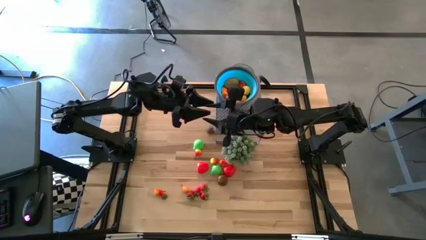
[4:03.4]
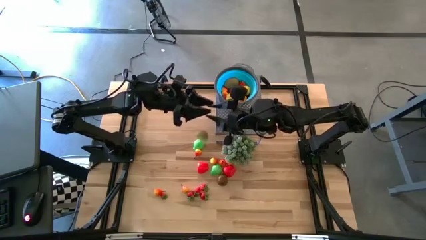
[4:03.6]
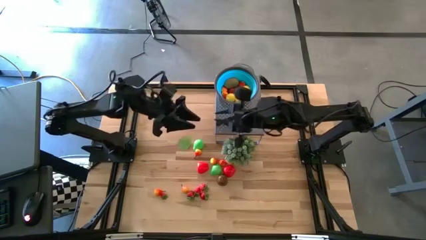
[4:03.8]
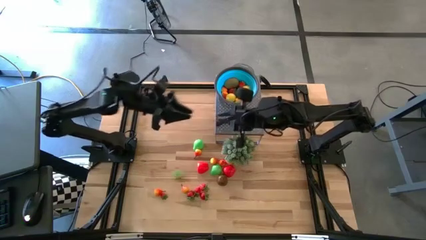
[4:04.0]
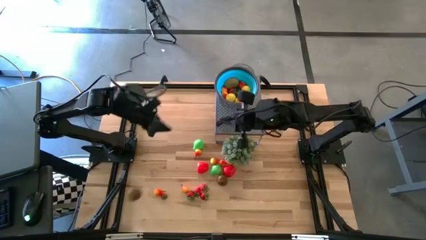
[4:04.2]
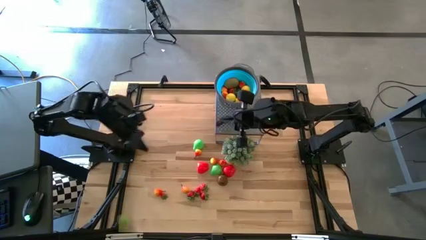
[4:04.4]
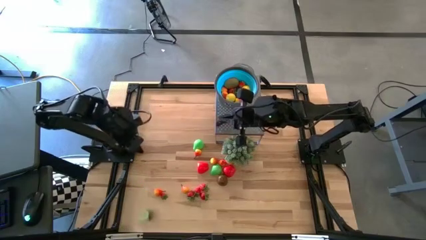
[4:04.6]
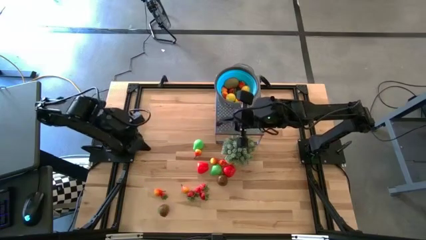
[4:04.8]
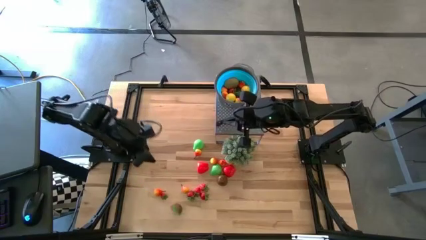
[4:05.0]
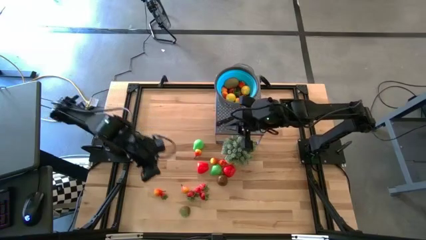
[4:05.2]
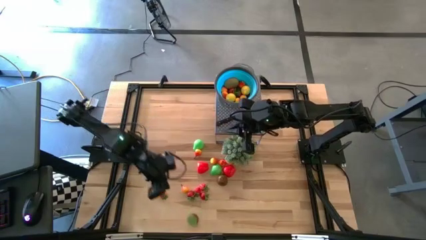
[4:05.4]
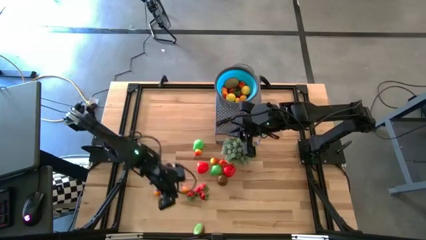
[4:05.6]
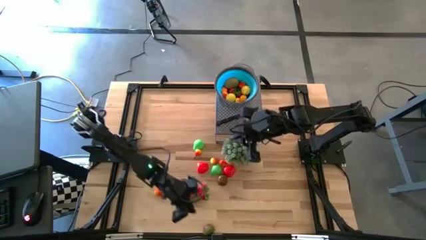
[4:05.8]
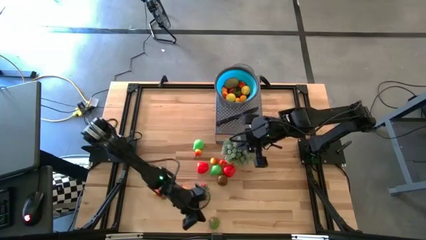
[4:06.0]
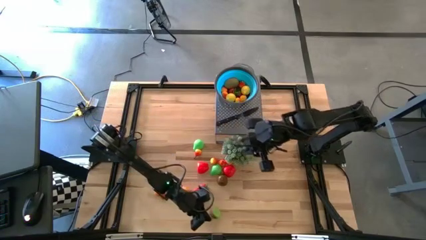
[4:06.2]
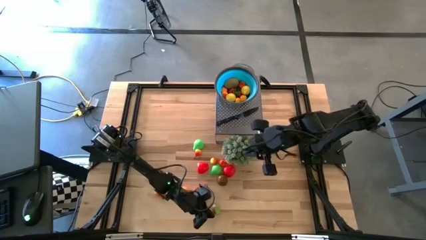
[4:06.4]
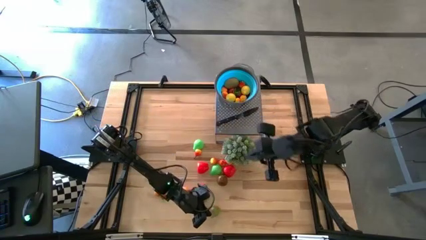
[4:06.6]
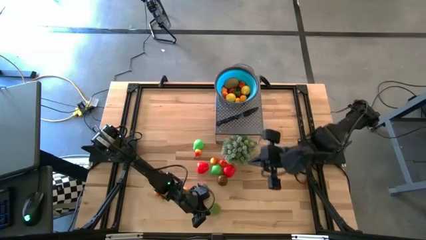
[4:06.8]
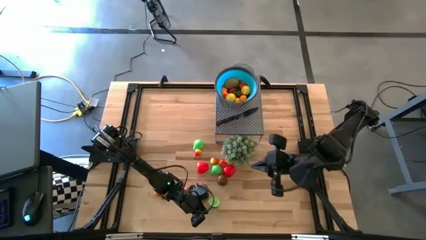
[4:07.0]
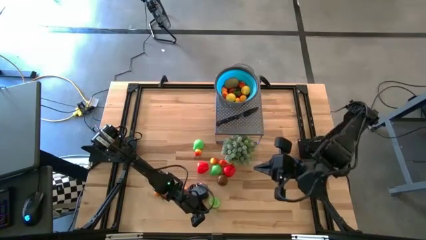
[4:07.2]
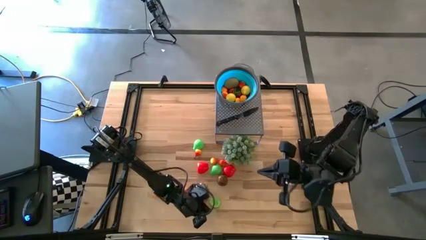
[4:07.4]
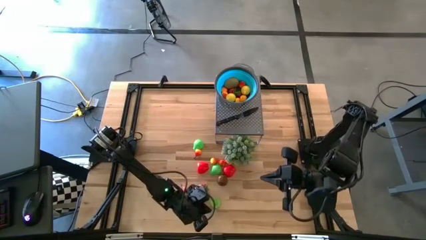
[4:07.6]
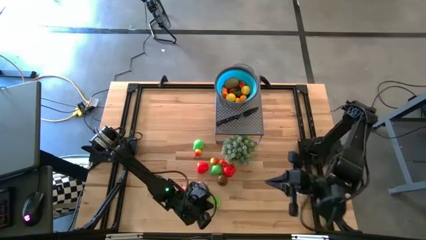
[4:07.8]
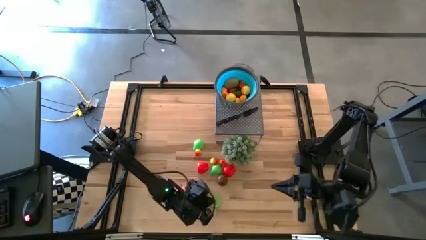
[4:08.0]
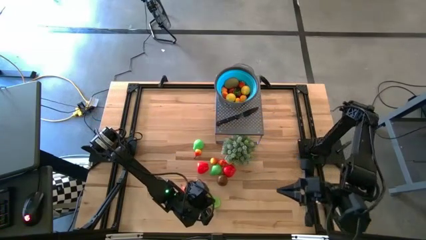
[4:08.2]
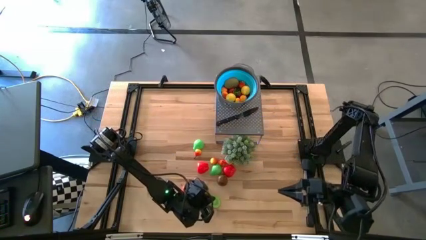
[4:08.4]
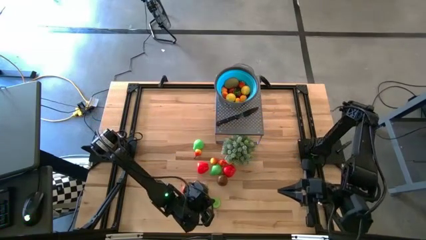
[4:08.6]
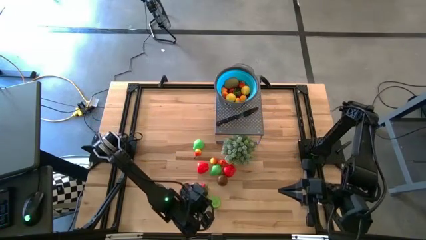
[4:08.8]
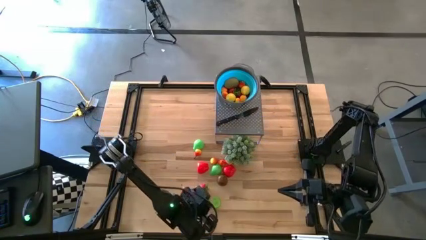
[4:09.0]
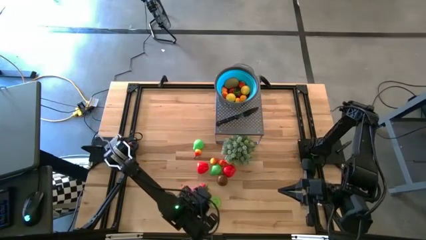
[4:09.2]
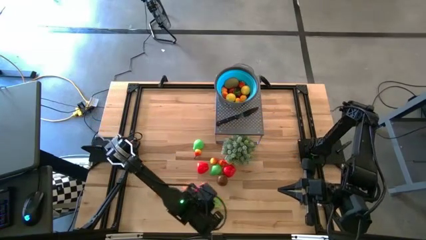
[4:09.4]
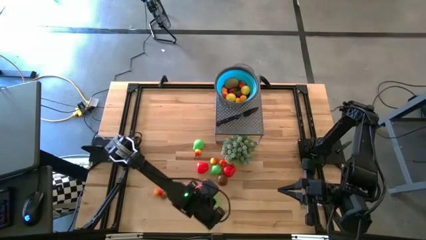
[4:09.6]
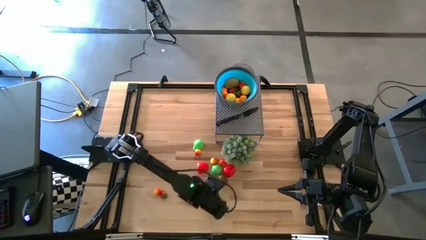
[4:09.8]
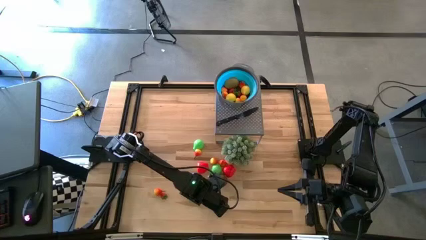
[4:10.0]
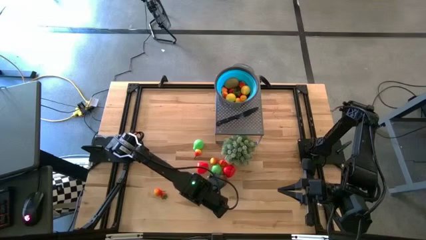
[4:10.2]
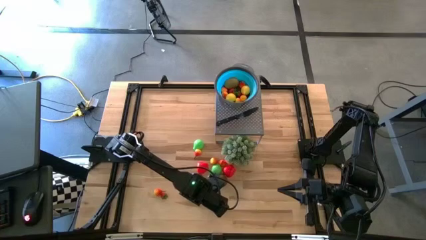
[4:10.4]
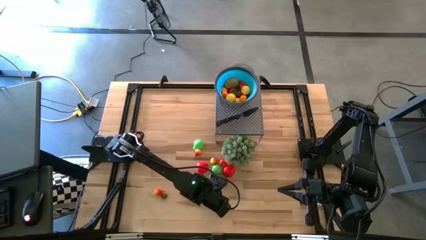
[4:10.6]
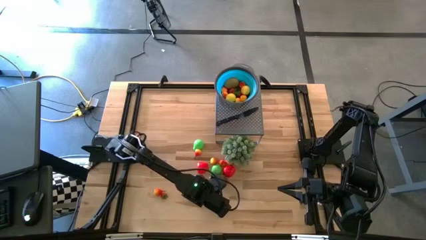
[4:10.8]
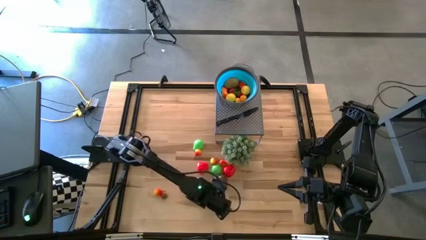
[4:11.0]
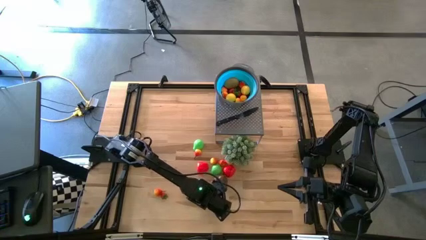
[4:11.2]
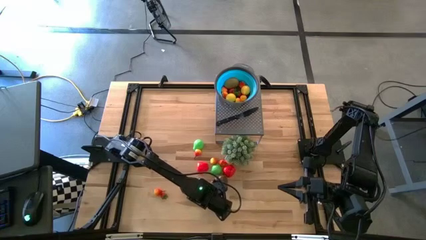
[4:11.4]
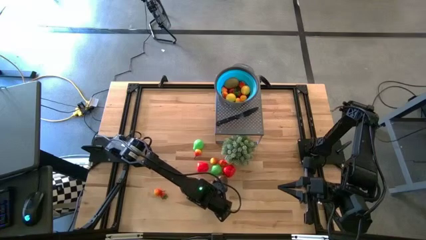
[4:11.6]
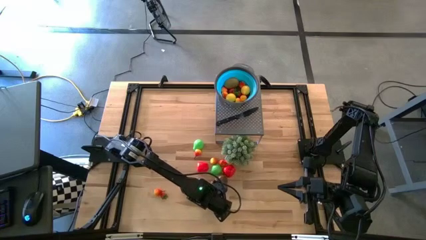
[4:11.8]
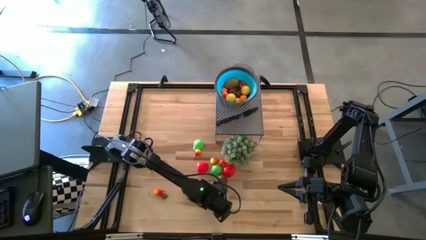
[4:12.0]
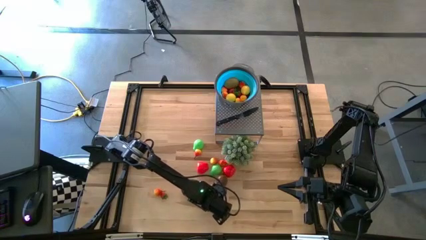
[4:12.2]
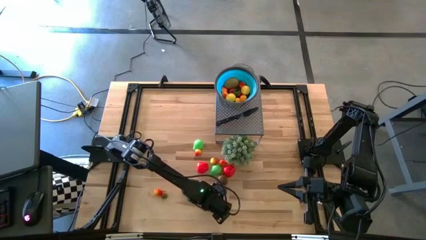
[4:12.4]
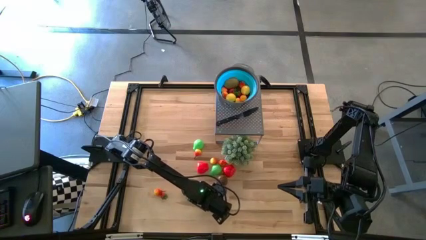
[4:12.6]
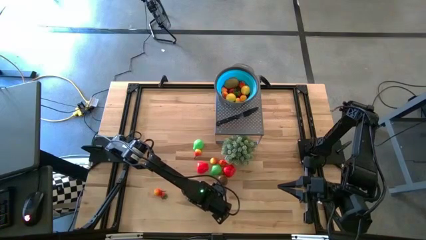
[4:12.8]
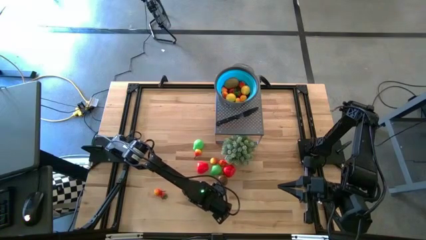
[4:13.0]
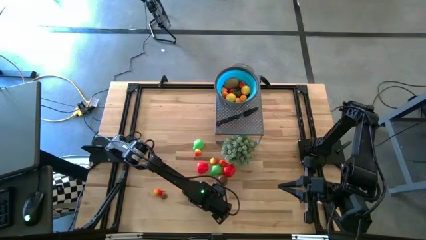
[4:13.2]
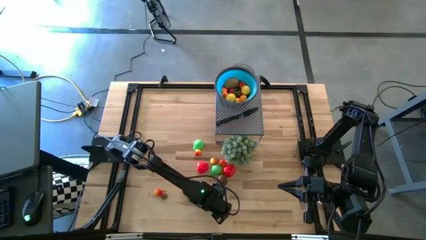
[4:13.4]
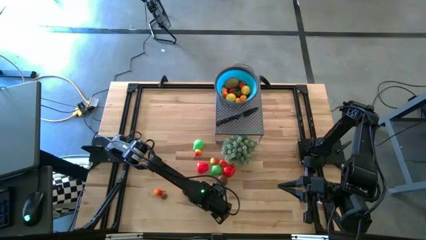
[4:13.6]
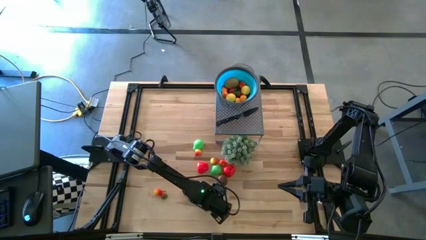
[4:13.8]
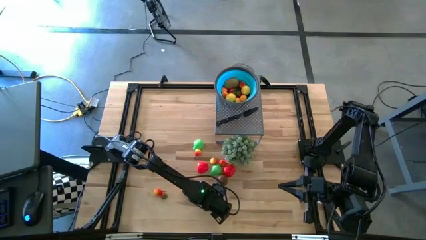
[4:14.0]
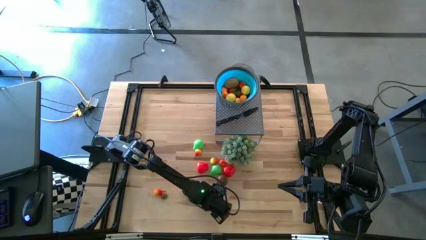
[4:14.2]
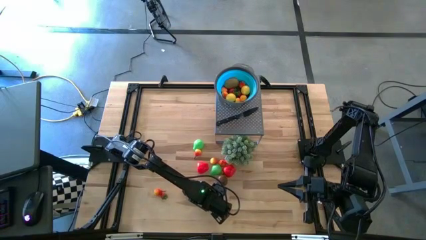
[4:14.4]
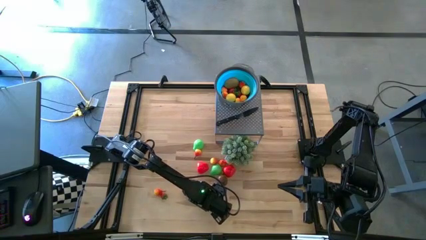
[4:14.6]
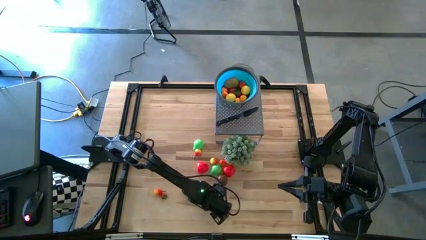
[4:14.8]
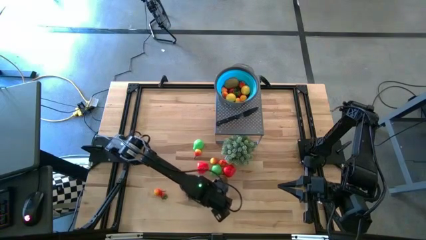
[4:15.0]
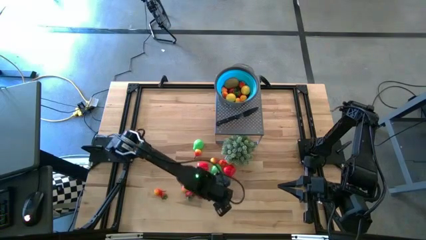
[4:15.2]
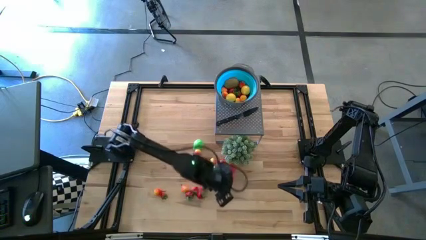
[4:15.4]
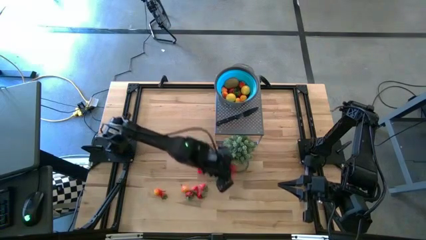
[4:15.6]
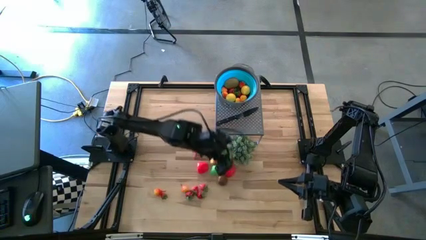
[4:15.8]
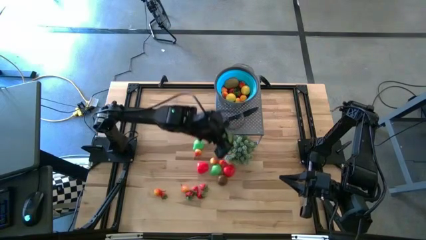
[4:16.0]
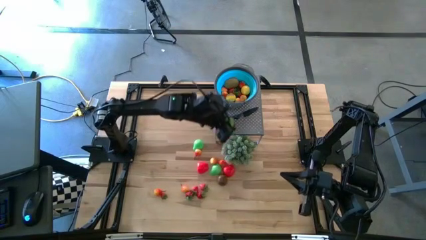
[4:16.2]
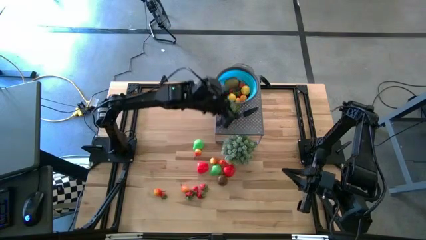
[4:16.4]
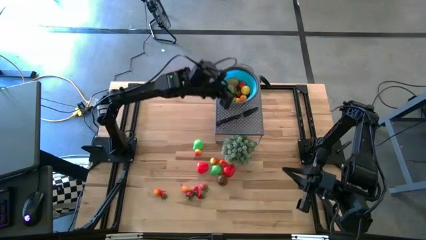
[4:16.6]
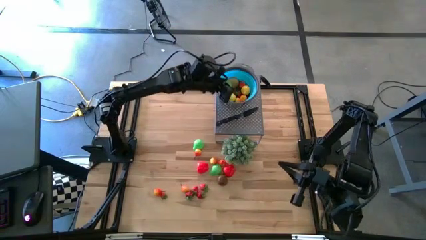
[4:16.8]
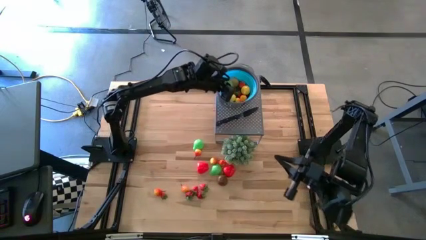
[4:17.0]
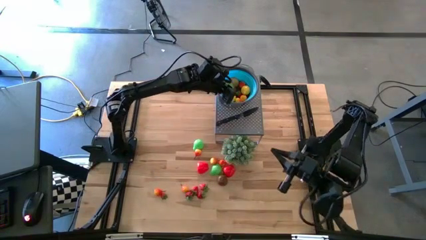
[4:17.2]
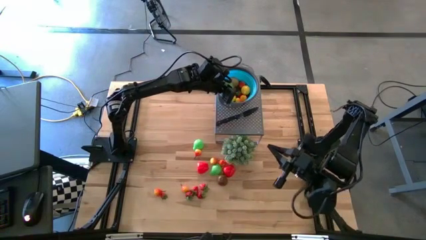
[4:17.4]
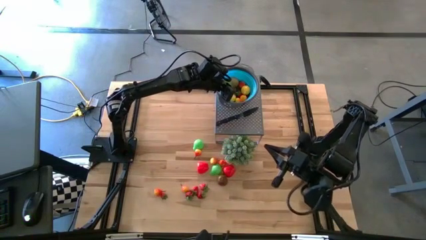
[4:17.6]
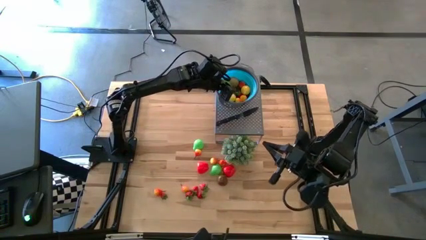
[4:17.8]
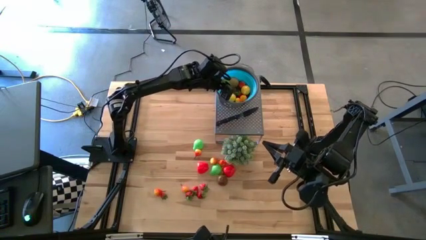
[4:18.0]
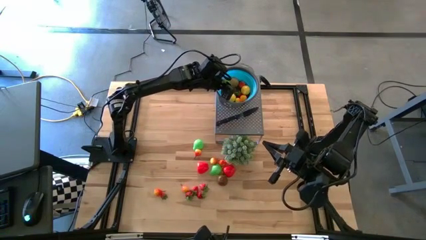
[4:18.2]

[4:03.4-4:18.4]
Task: Pick & Place Fruit
Put the brown kiwi into the blue strainer bowl

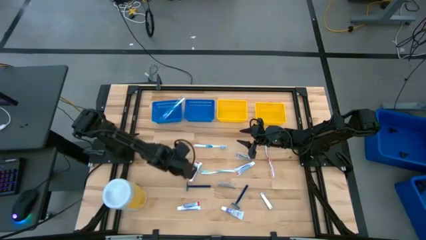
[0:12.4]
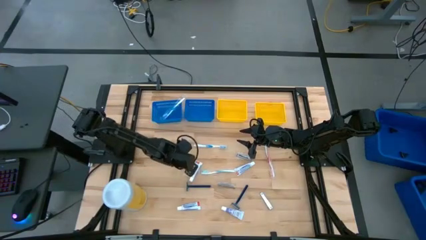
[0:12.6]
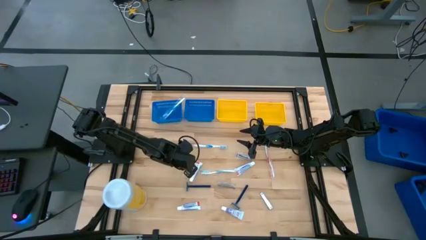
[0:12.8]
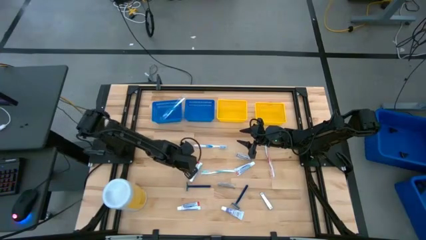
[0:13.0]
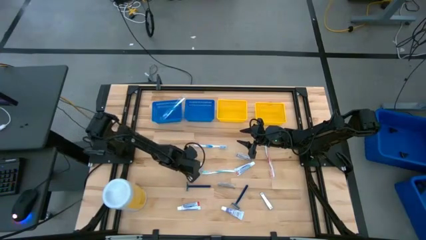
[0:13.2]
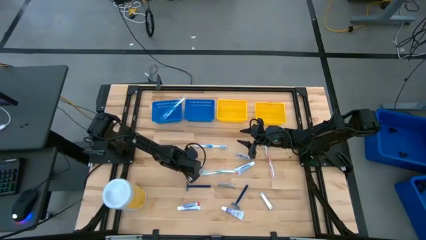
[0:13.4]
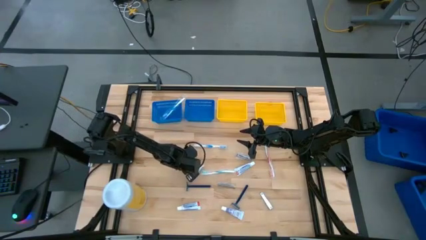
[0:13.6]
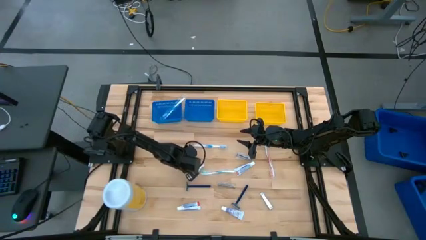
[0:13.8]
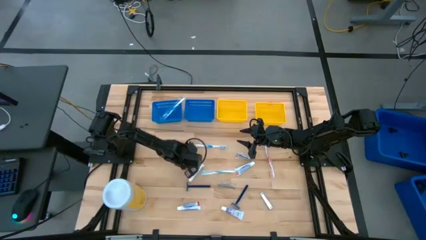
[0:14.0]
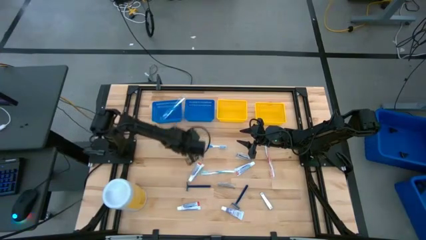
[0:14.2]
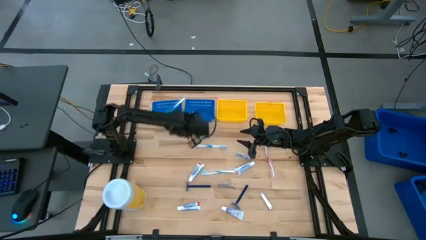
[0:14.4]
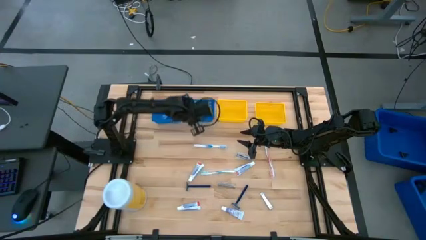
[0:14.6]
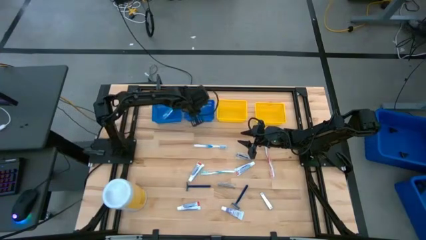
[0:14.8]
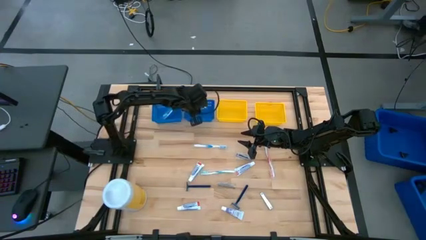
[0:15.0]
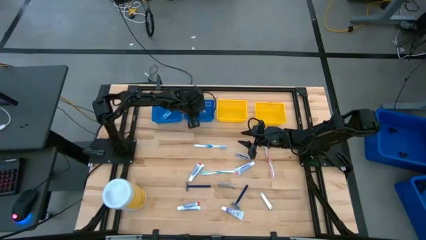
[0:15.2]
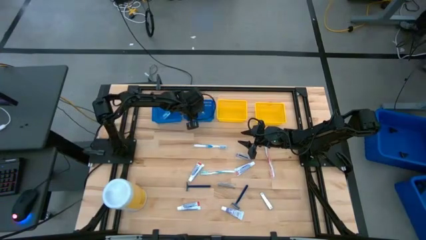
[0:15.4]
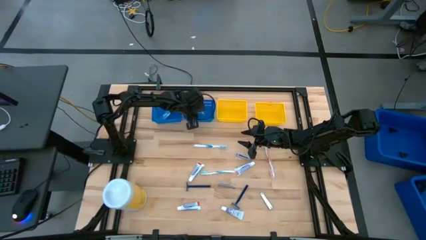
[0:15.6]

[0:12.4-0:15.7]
Task: Pick & Place Travel size toiletries
Put the silver nail cutter into the right blue bin
